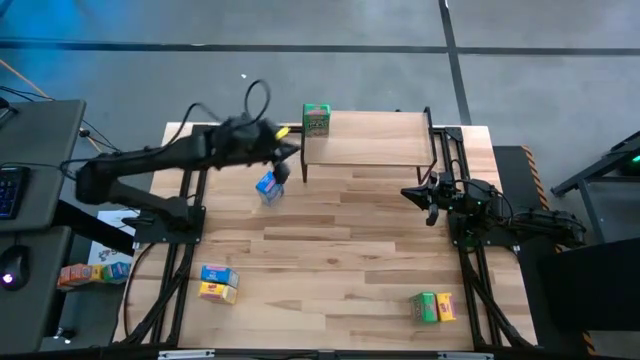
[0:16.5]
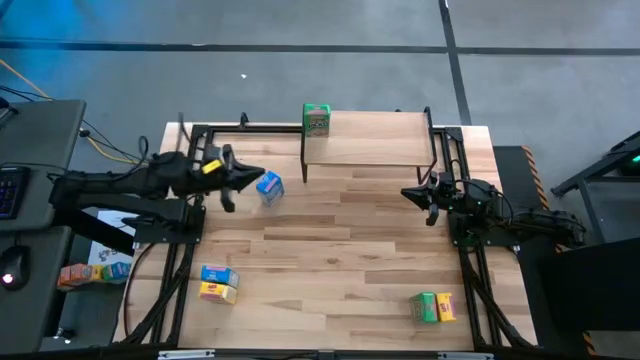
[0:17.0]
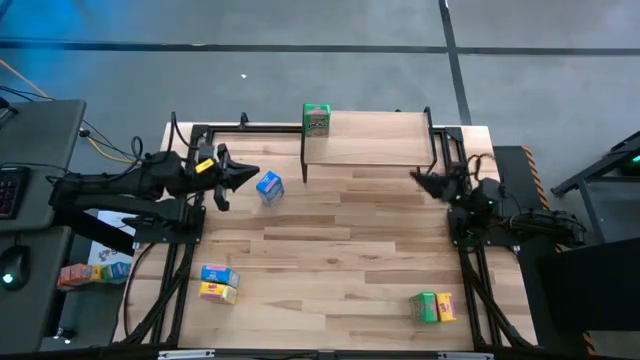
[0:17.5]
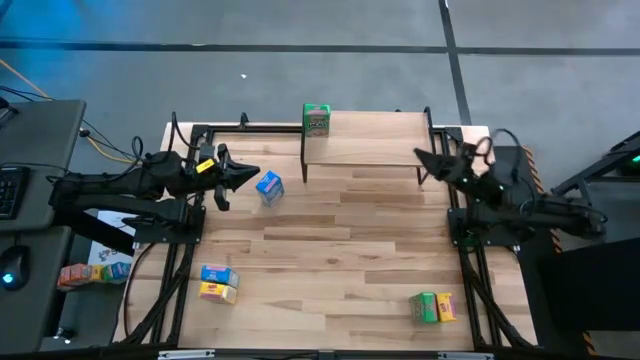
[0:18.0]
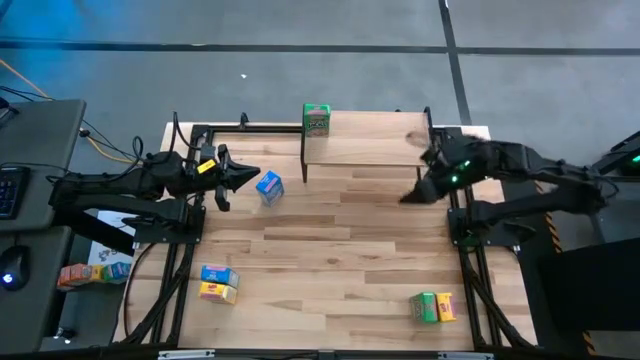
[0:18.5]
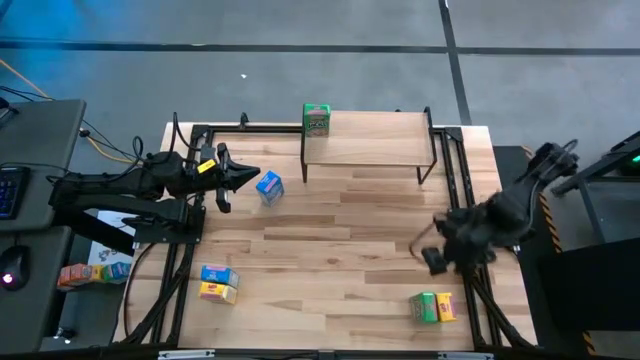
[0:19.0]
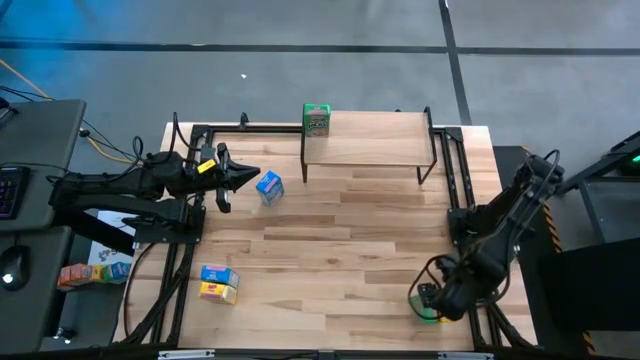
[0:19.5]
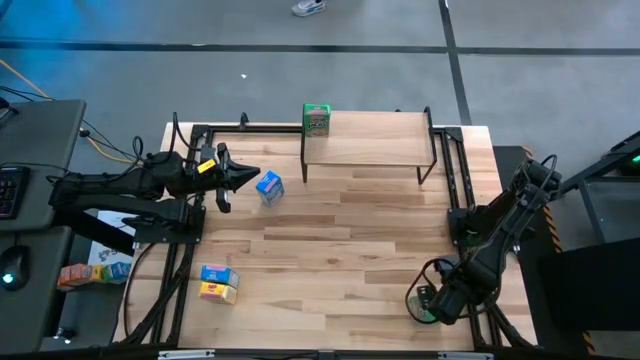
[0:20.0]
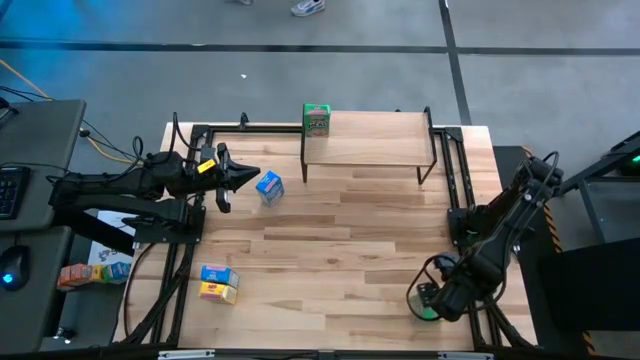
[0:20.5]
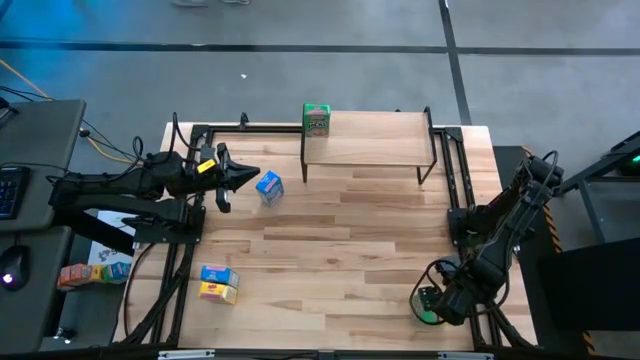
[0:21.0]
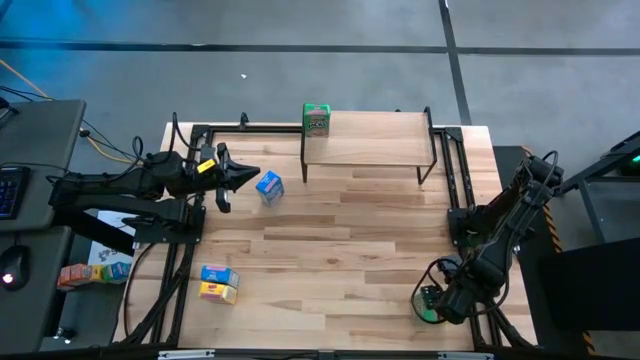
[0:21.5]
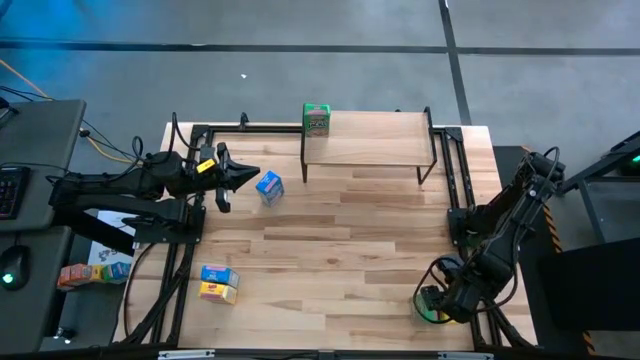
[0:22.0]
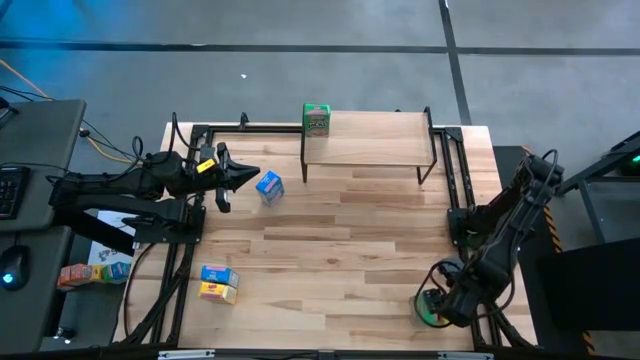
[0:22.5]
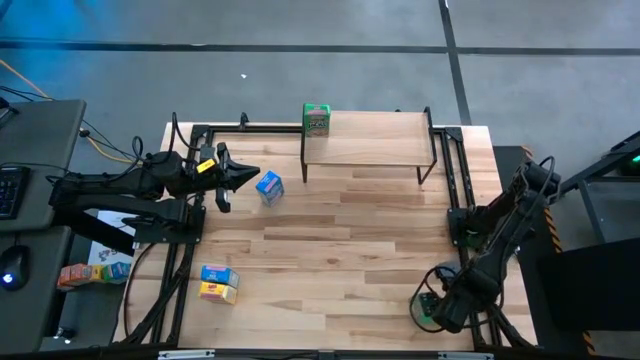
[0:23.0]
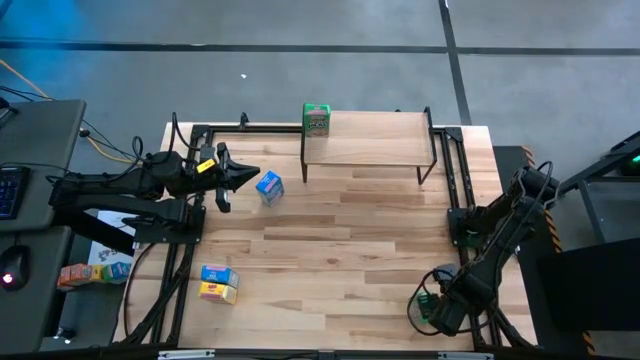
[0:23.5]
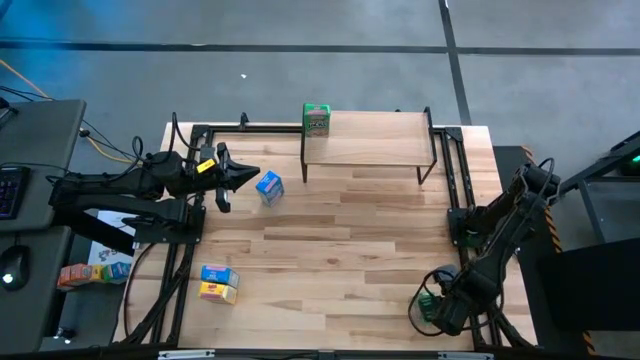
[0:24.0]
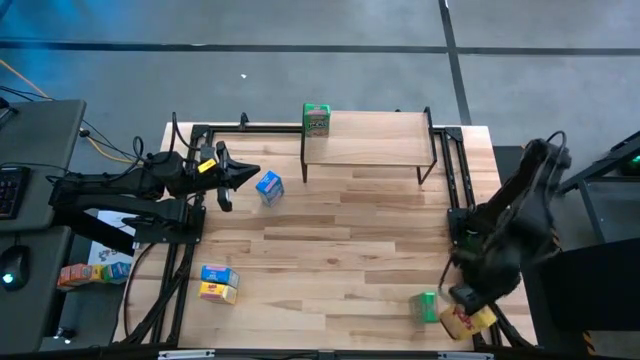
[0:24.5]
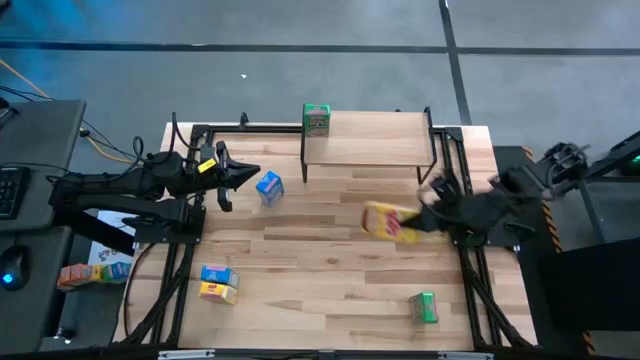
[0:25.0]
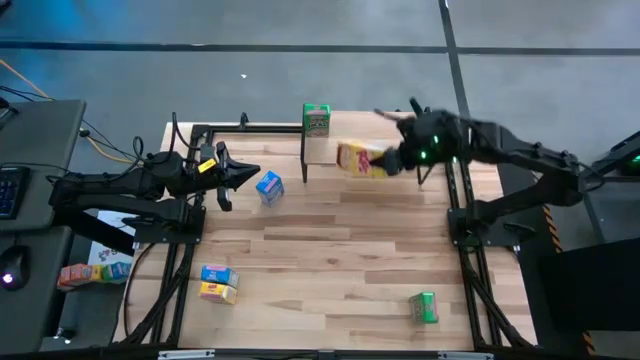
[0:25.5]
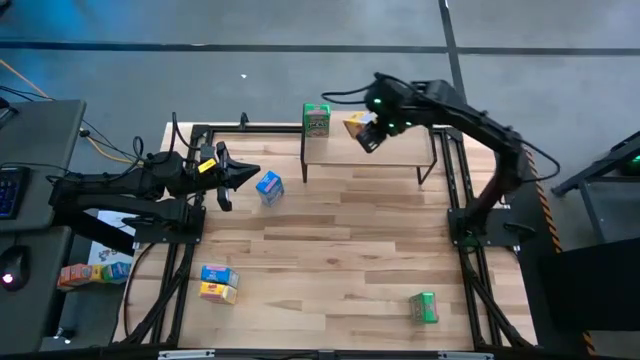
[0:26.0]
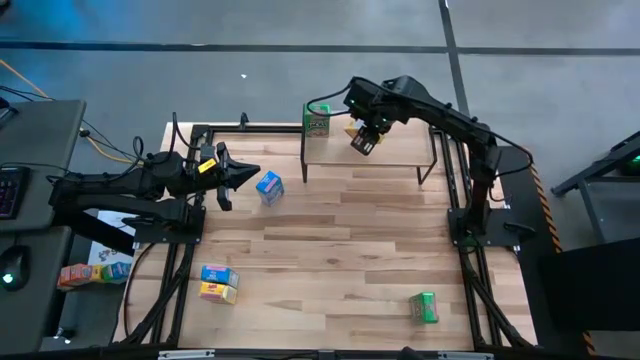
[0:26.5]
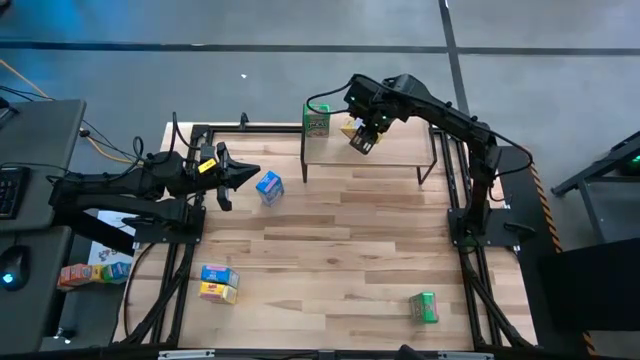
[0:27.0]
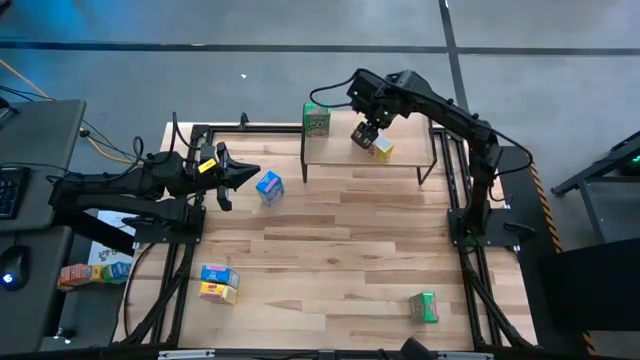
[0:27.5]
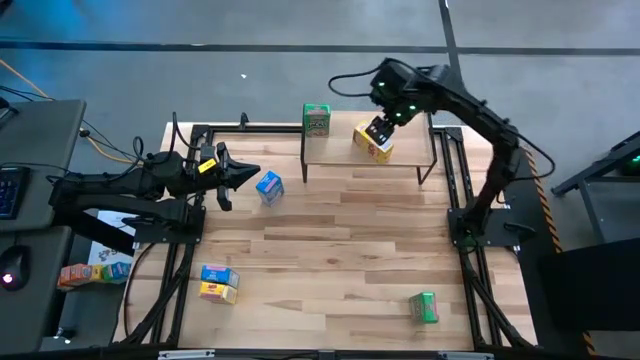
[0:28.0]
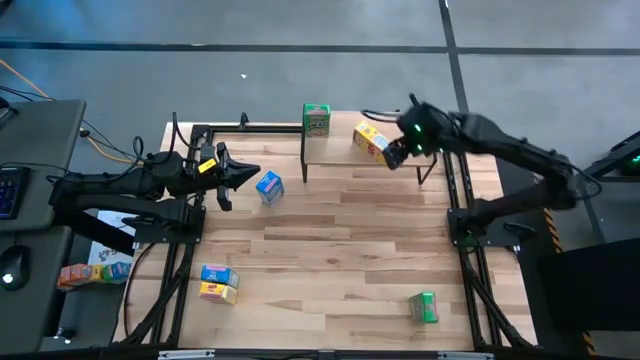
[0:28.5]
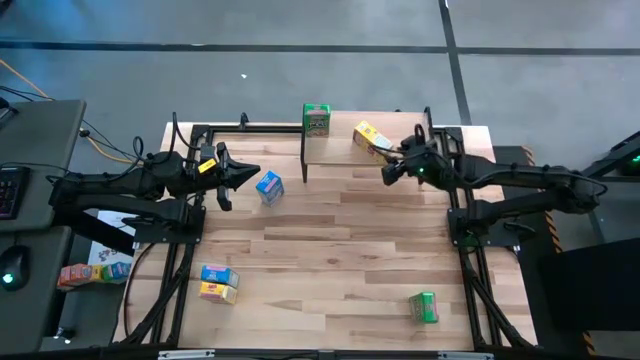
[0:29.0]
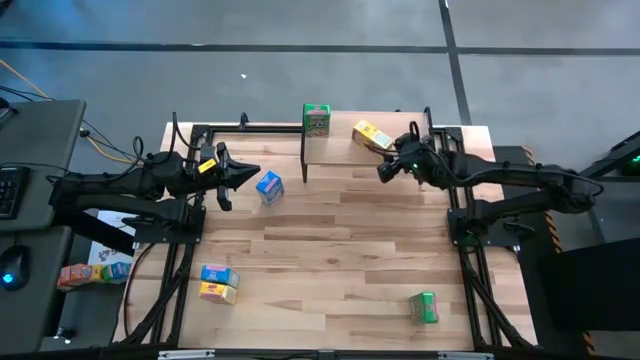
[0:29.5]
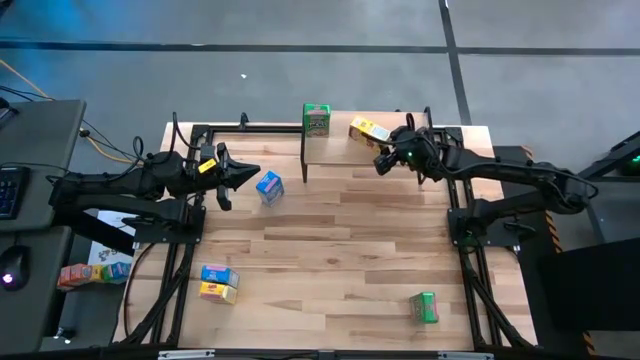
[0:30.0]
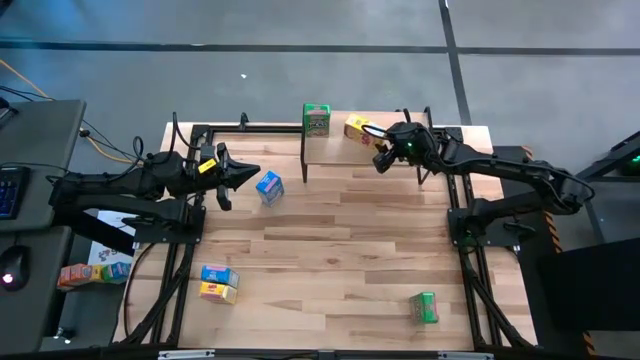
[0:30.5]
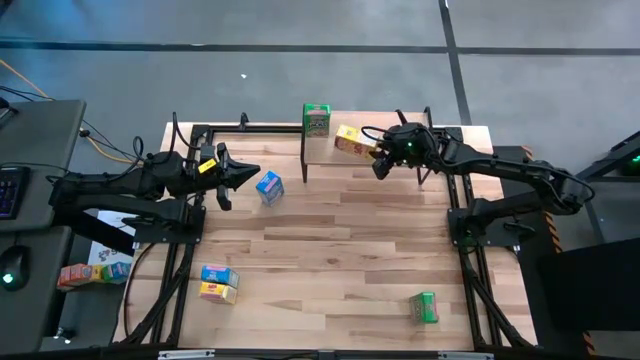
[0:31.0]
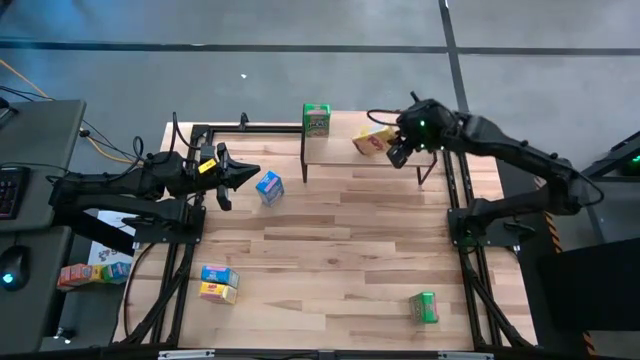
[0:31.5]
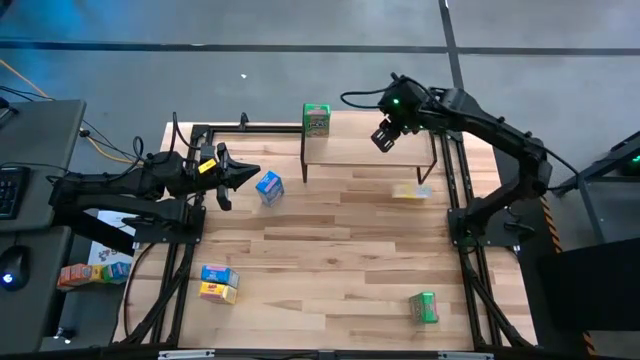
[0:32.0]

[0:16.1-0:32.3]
Task: Stack cereal on shelf
Put the right yellow cereal box on the shelf

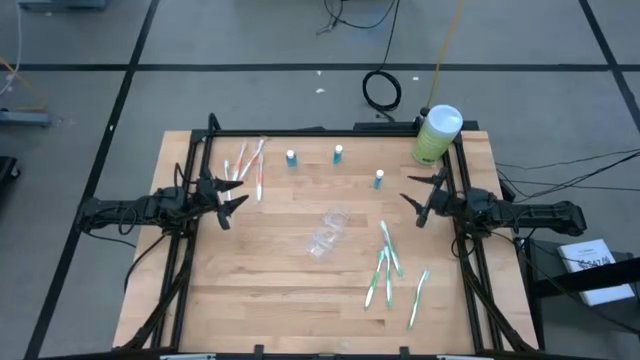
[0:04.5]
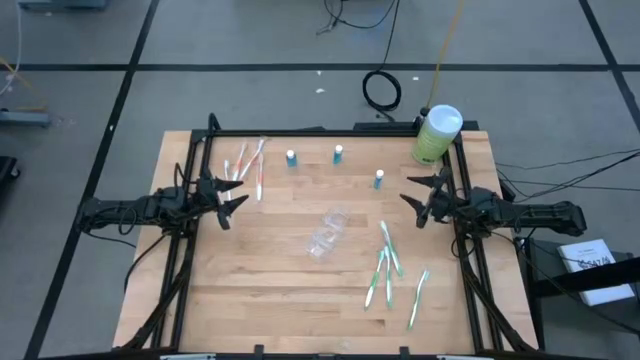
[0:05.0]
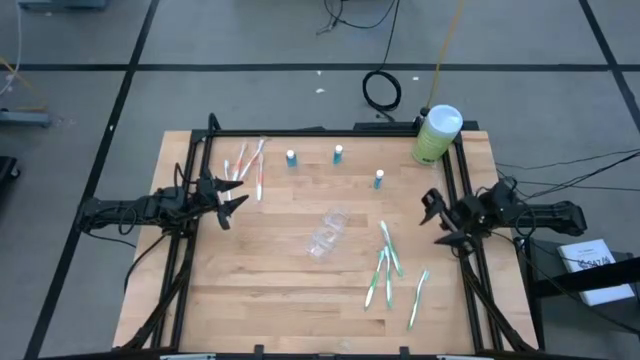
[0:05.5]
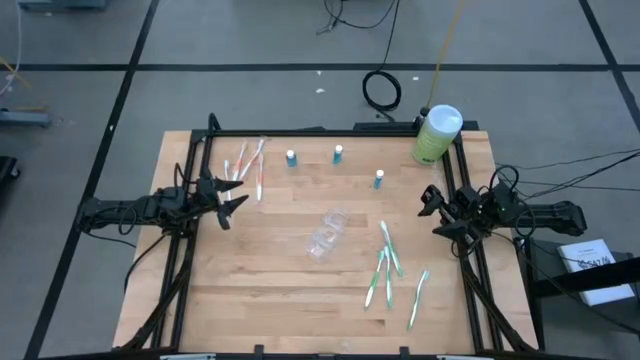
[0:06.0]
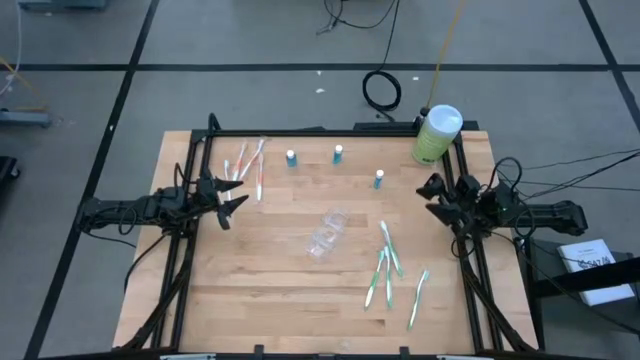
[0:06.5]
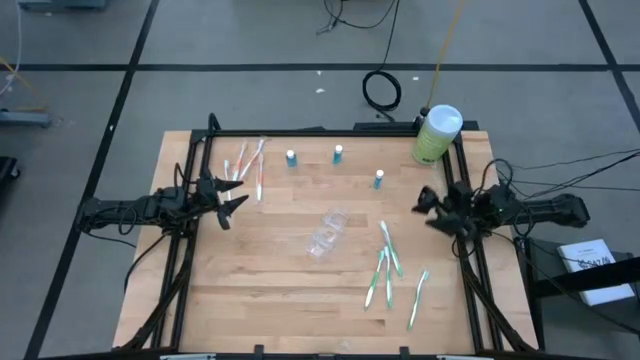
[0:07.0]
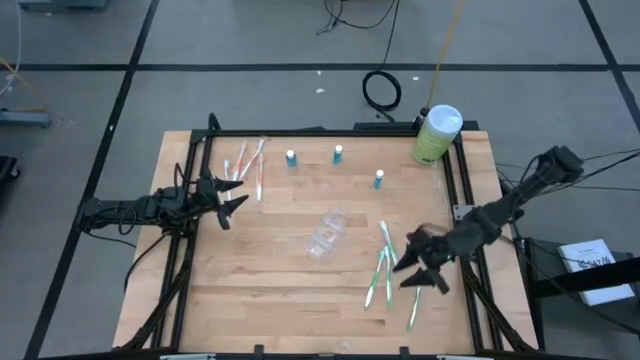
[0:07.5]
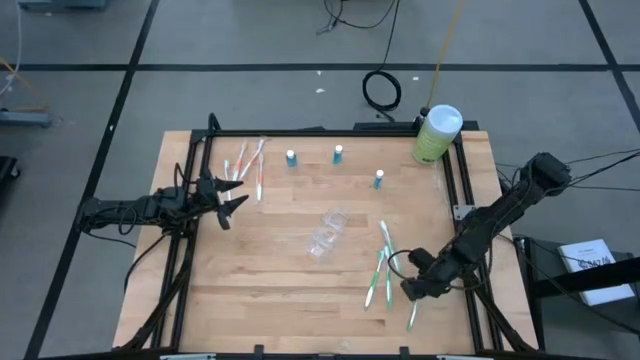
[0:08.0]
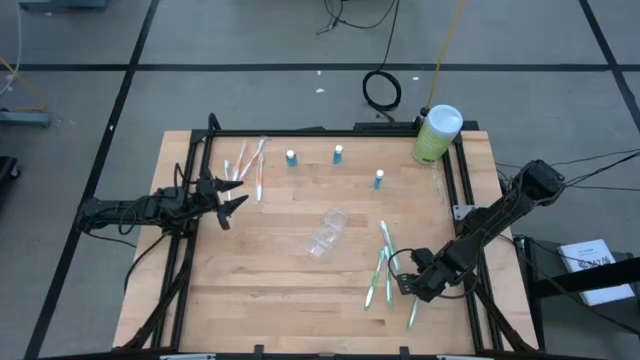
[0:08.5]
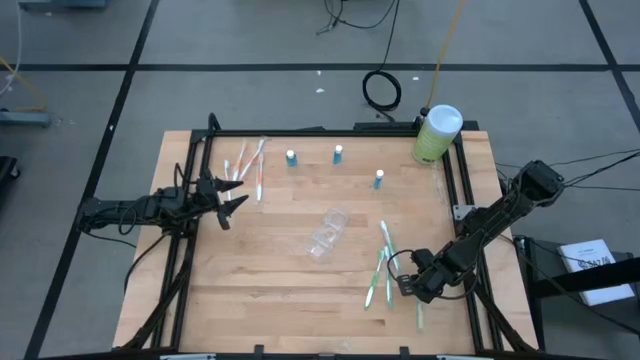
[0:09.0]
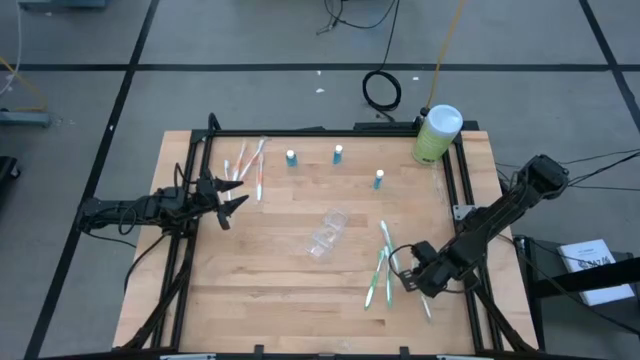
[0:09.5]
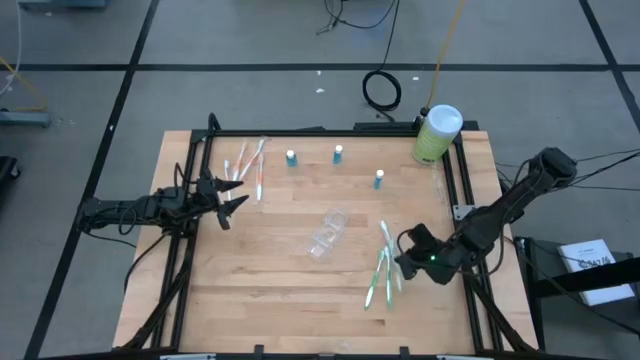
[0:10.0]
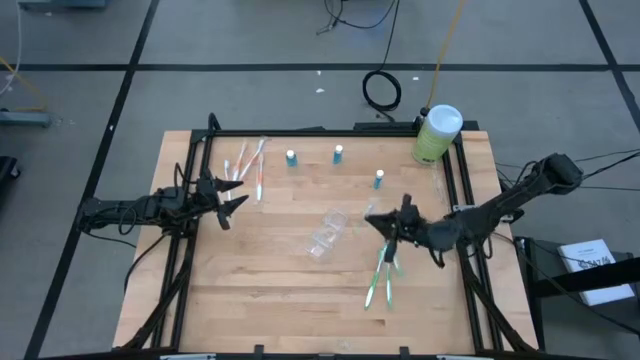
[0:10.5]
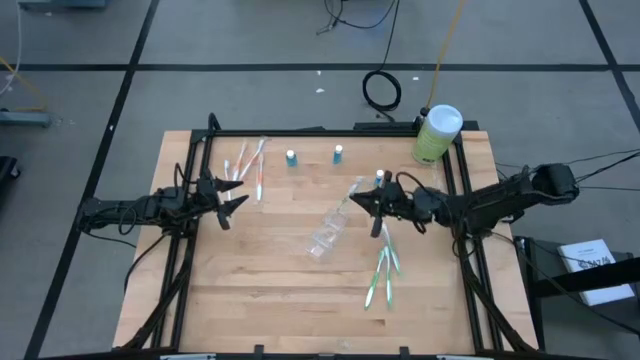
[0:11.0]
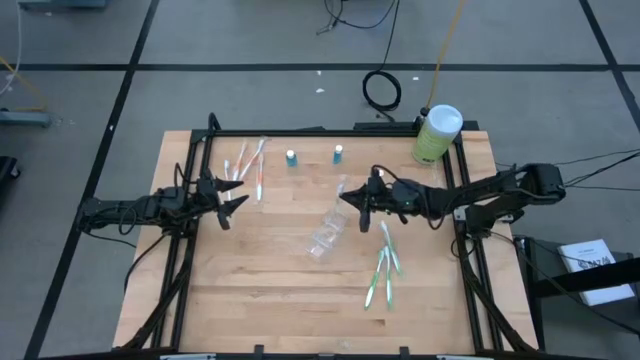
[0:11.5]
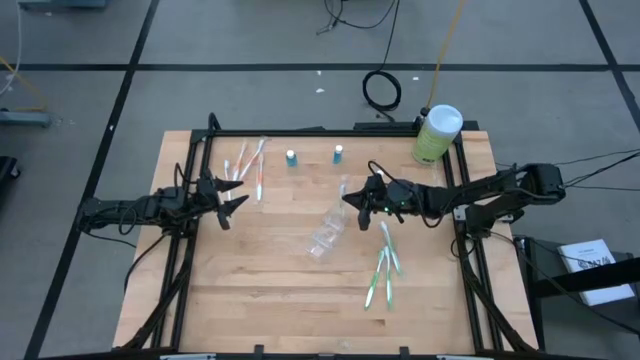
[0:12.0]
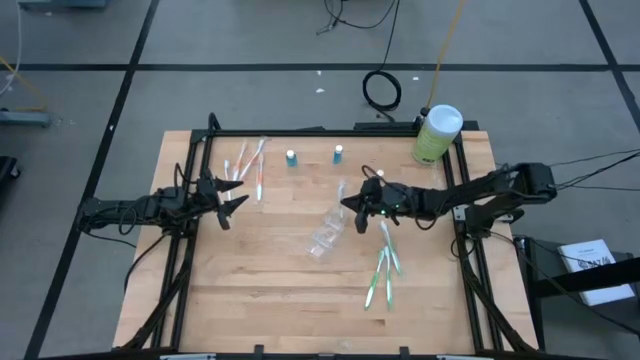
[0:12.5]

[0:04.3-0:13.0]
Task: Pick & Place toothbrushing station
Put the green toothbrush into the transparent organizer
